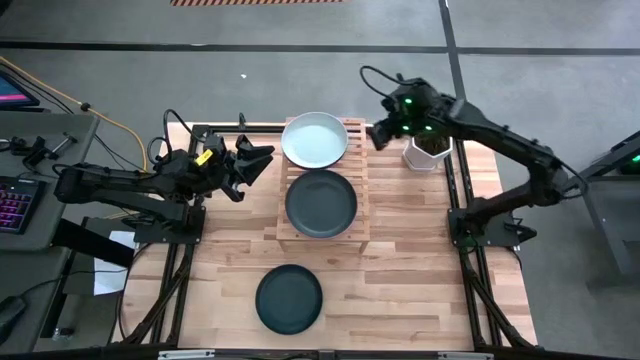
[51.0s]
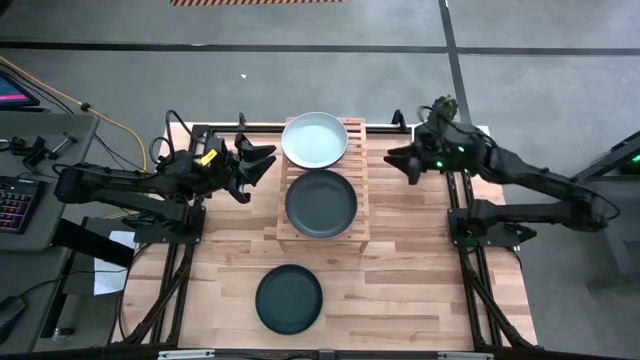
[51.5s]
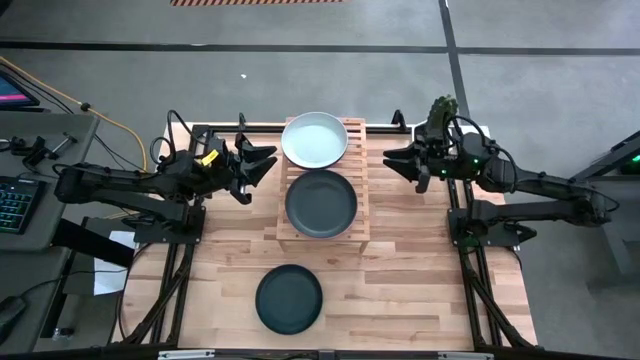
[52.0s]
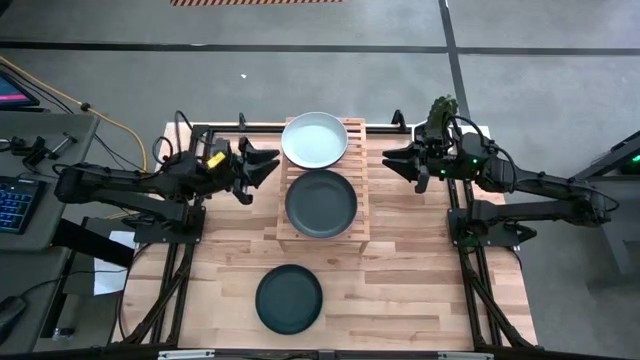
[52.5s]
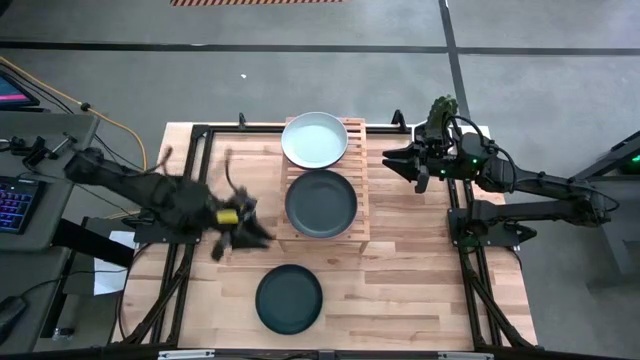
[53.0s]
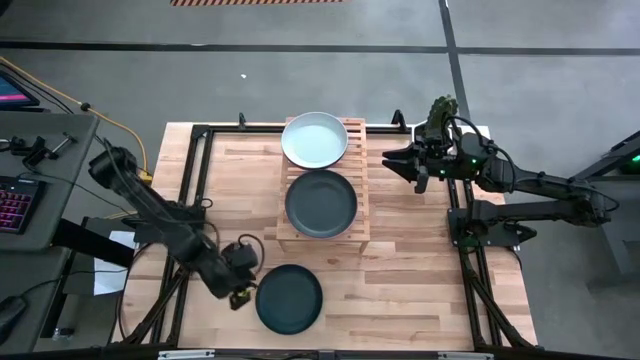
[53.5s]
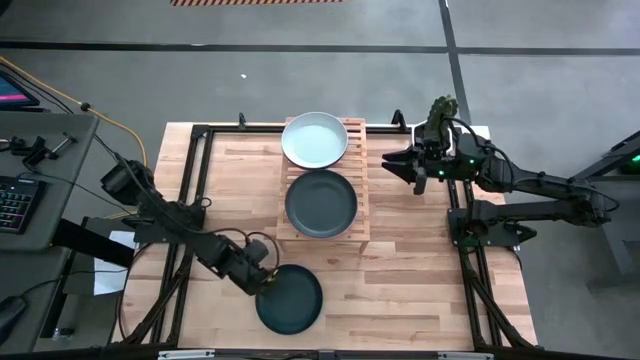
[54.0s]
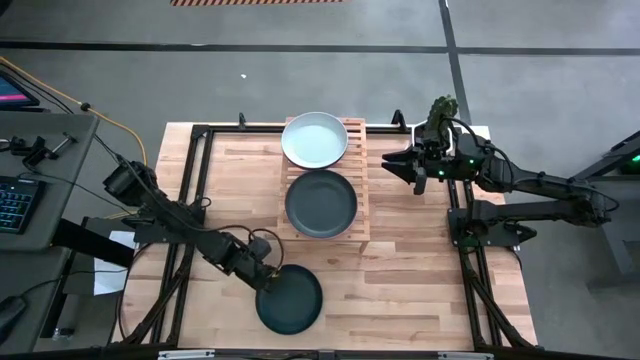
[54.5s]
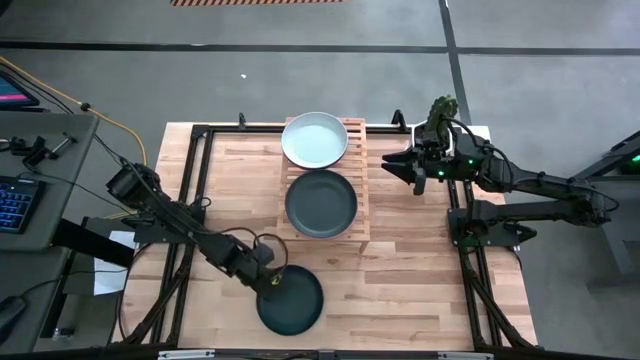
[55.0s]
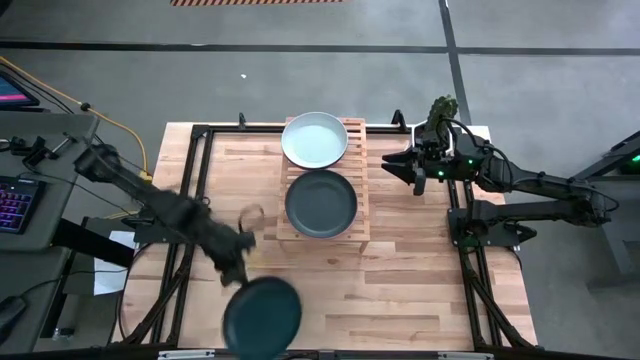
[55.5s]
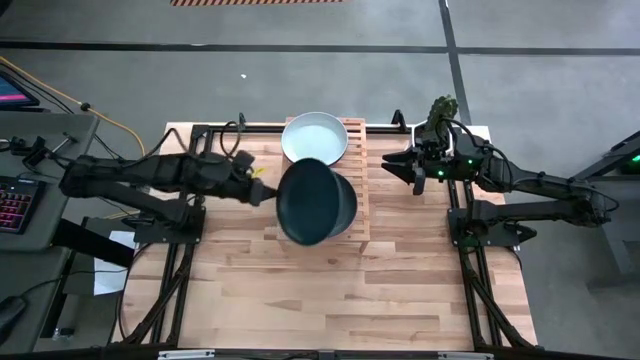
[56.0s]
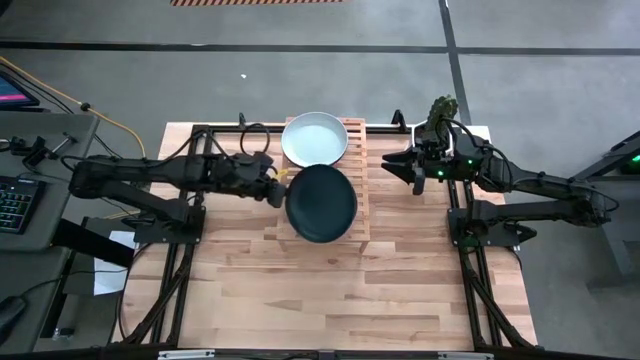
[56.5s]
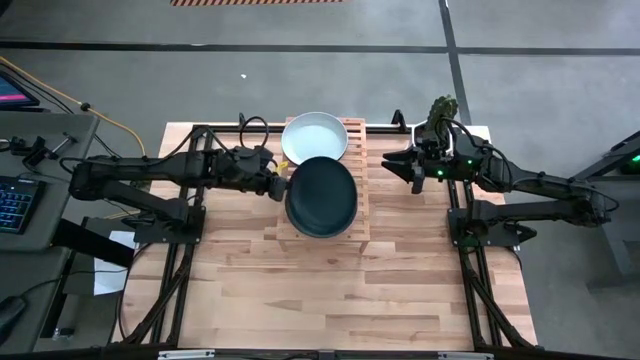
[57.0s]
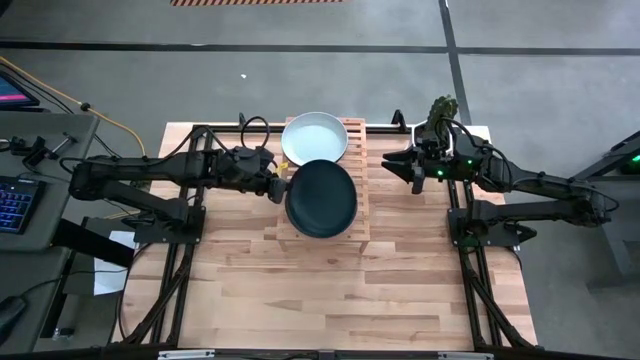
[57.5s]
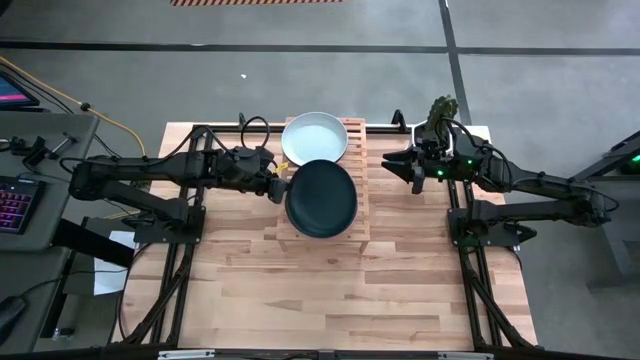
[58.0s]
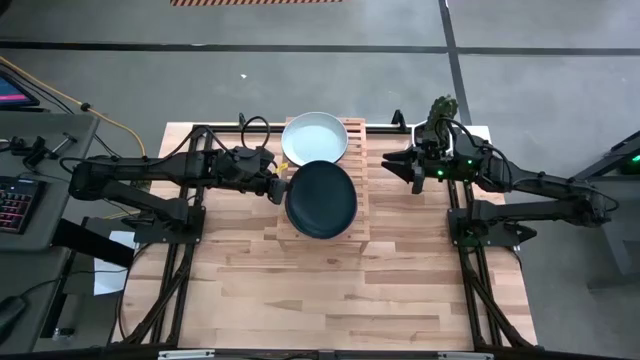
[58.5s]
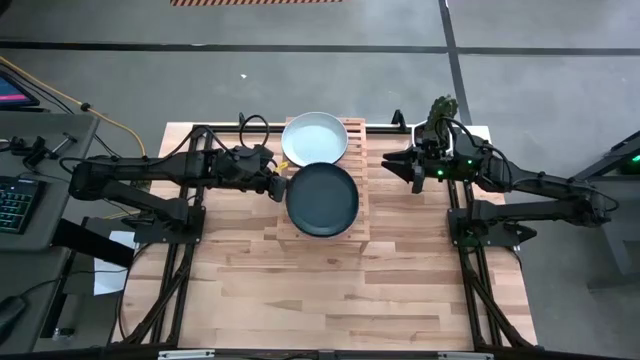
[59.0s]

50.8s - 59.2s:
Task: Place and stack plates onto a shelf
Stack the black plate on top of the black plate on the shelf

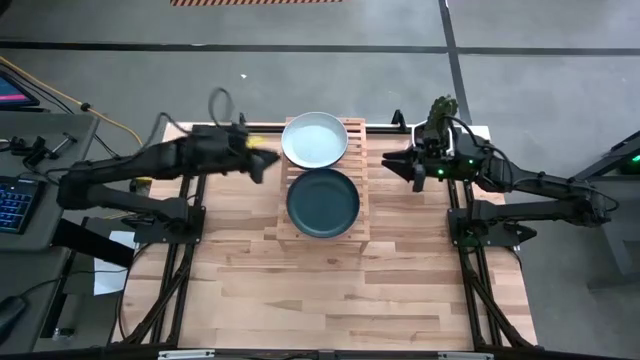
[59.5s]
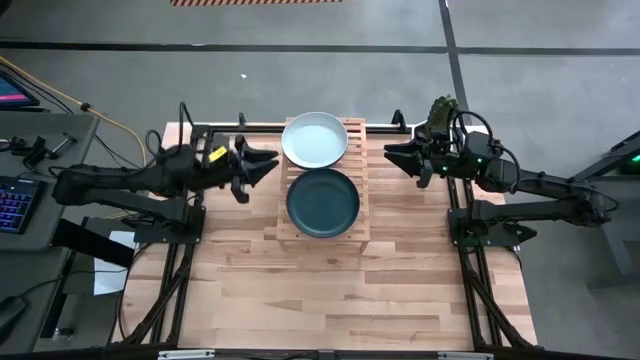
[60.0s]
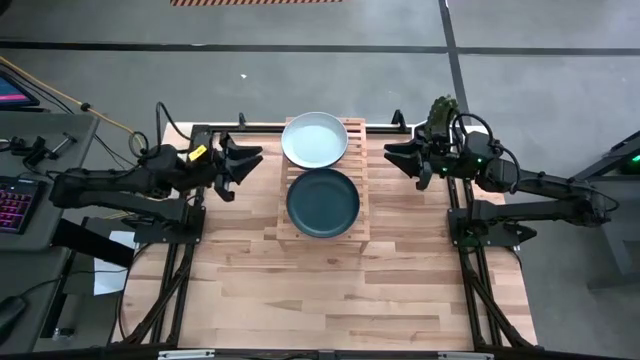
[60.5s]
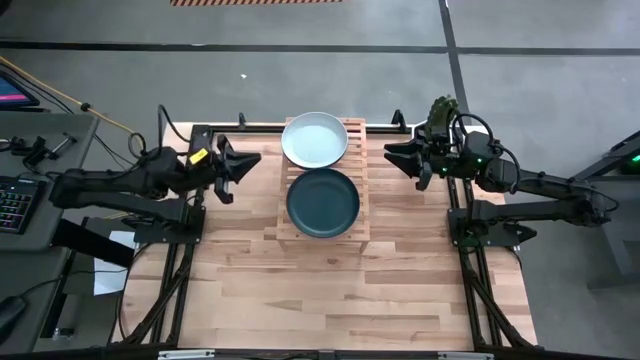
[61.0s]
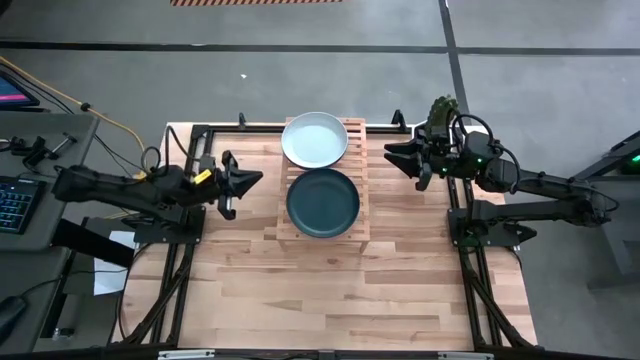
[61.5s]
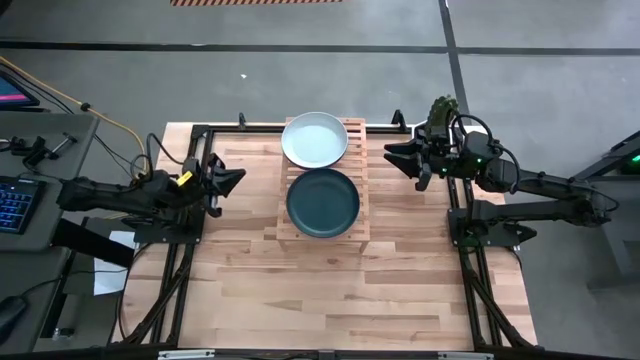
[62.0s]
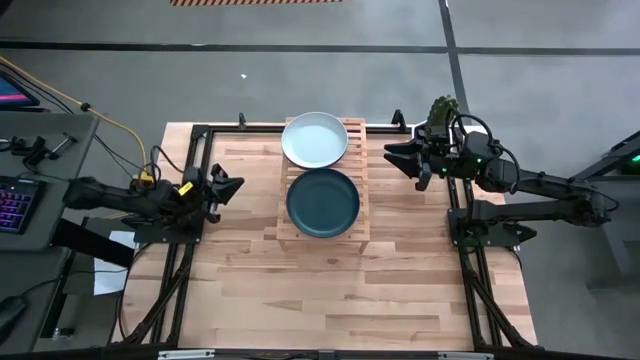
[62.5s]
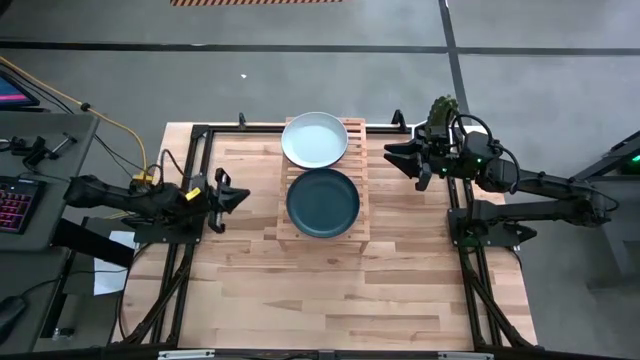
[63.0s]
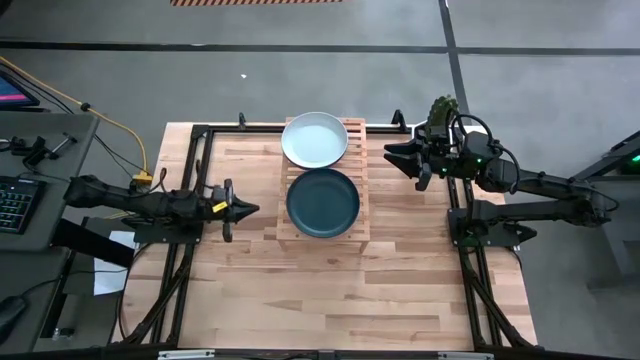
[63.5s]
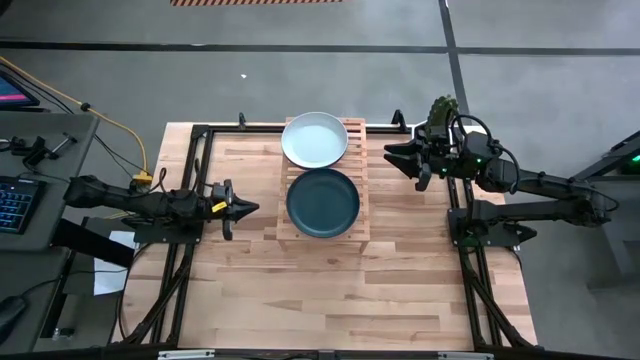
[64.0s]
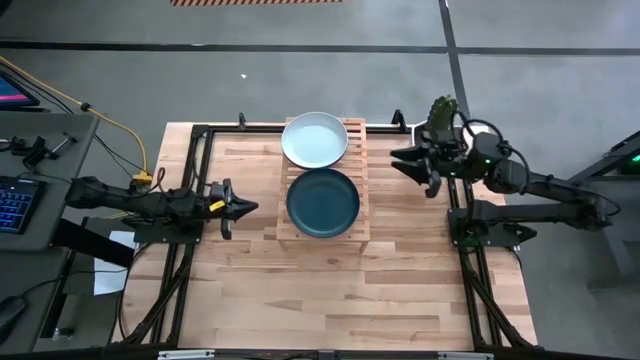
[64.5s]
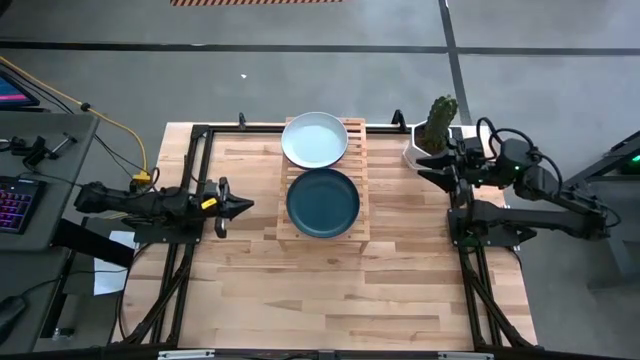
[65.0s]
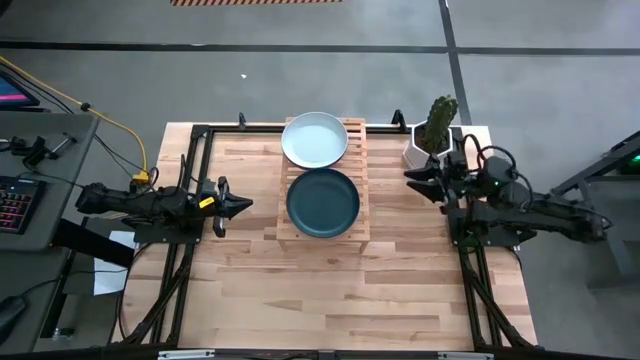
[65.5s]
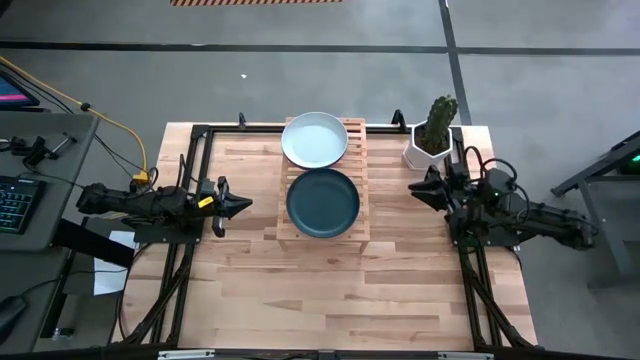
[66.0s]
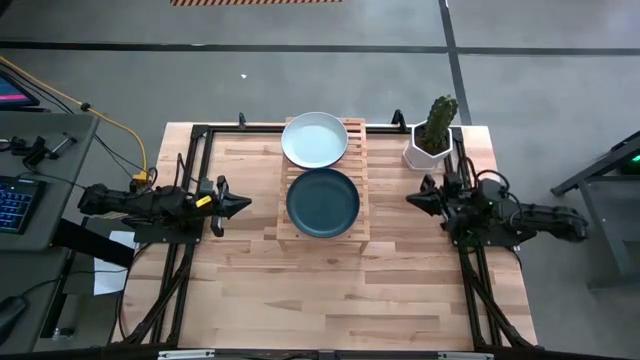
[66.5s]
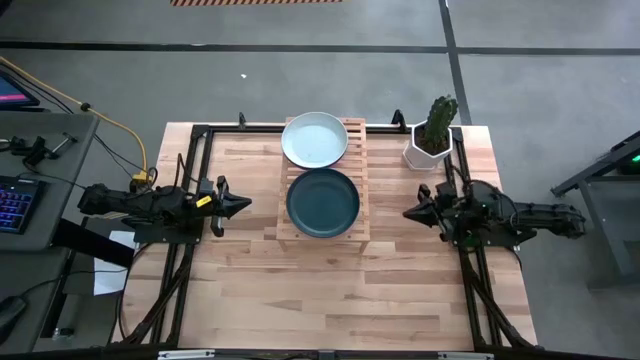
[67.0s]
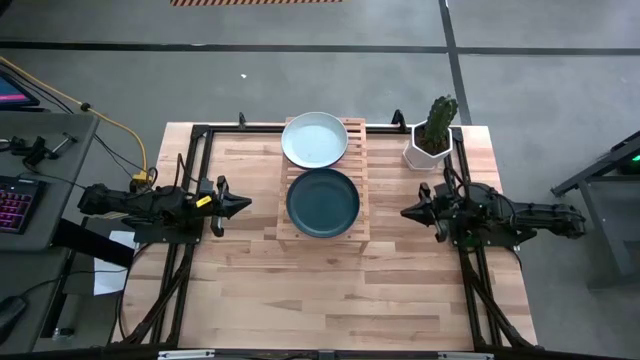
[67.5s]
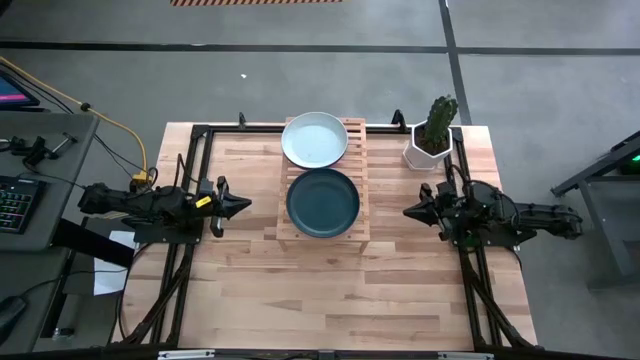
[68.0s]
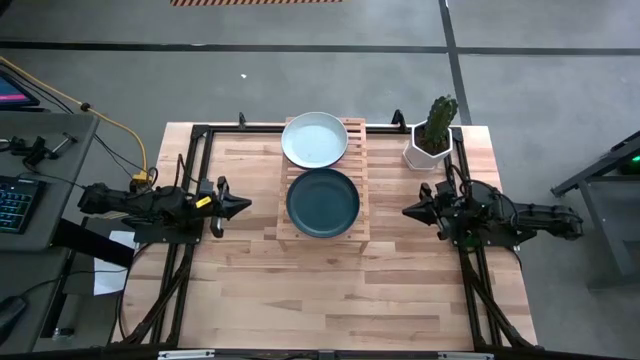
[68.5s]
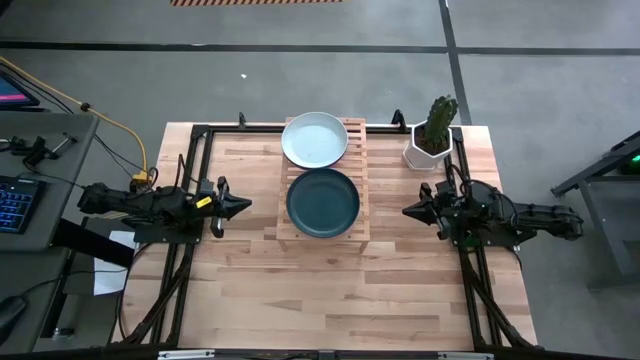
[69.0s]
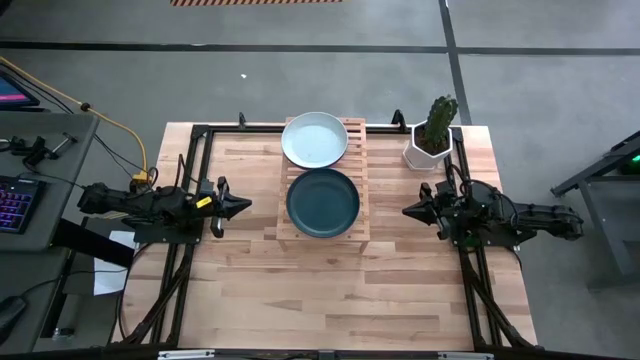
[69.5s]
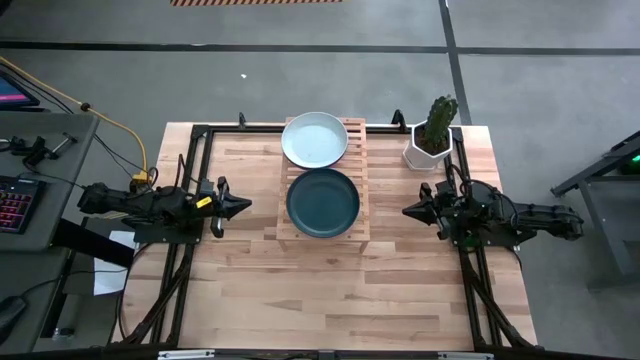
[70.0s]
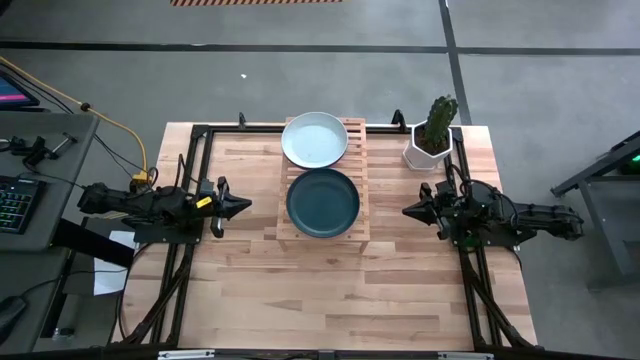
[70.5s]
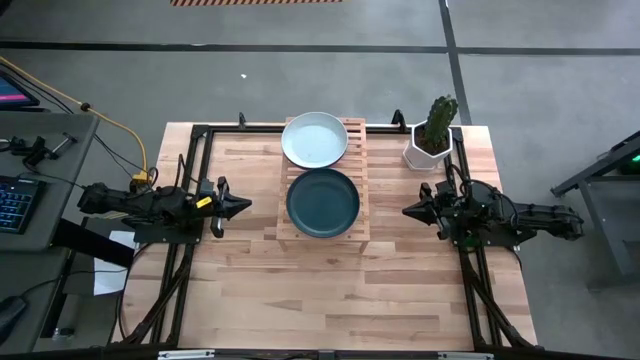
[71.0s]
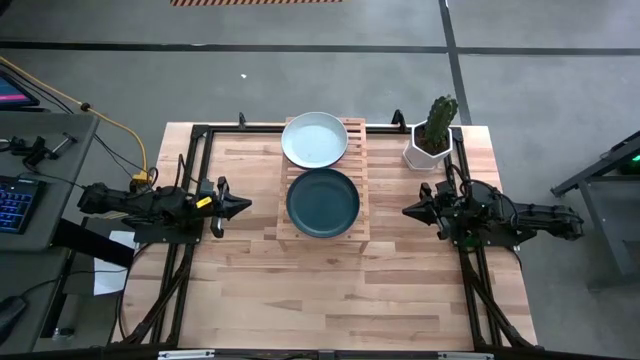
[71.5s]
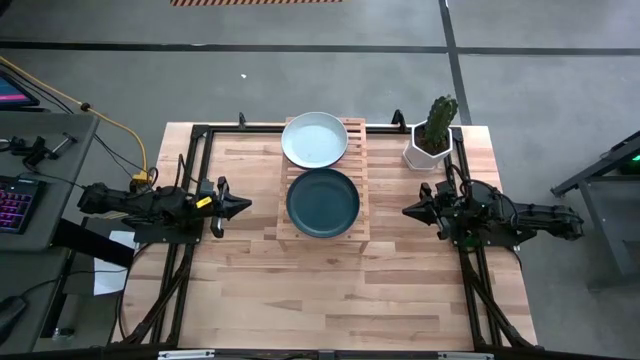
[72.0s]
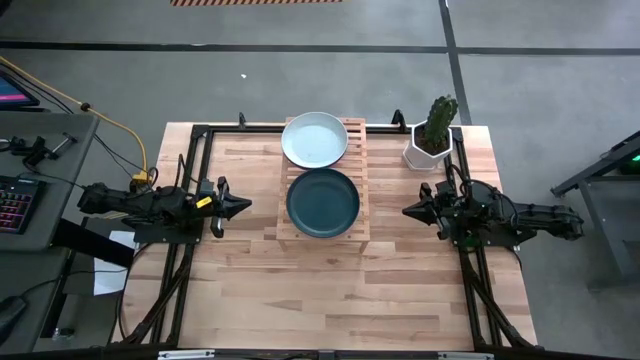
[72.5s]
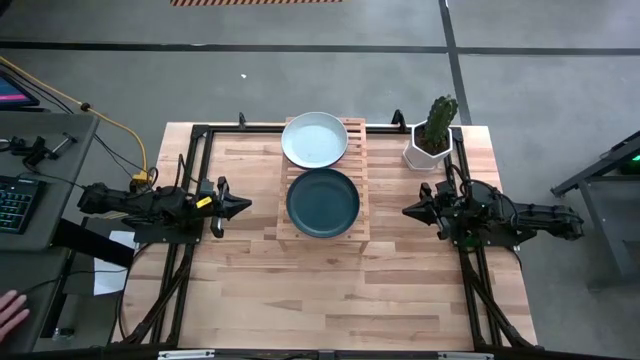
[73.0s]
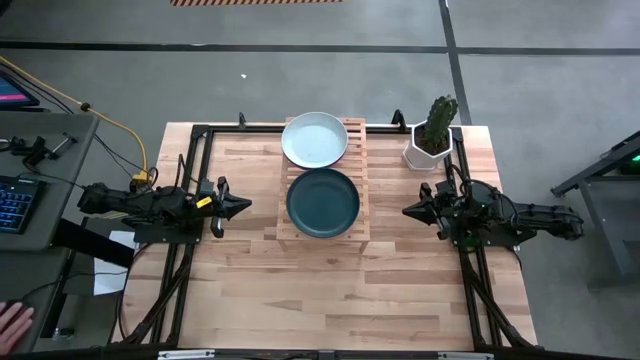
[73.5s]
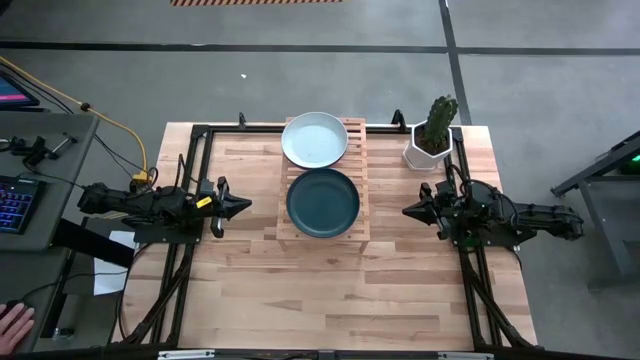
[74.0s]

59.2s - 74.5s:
Return to Home Position
